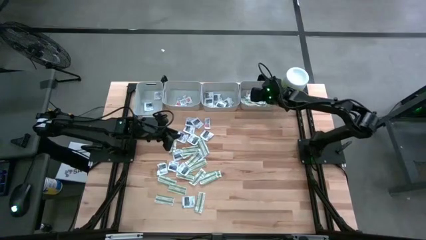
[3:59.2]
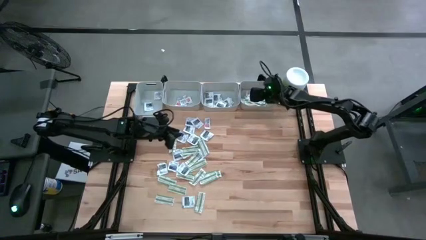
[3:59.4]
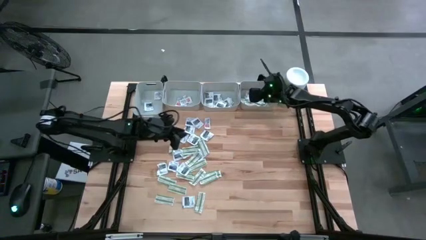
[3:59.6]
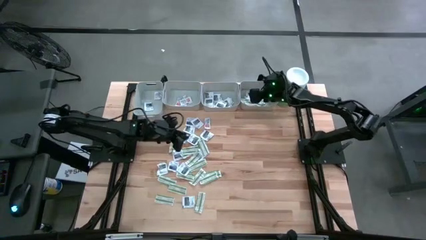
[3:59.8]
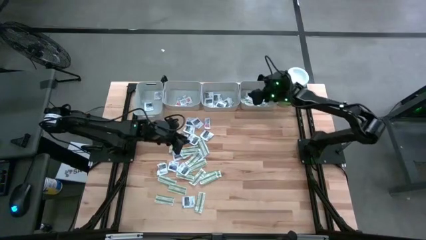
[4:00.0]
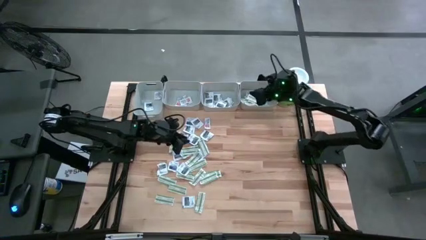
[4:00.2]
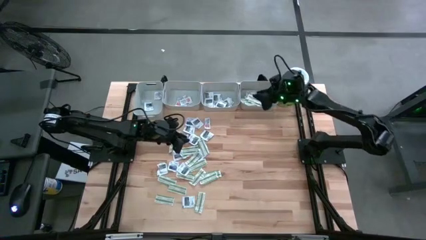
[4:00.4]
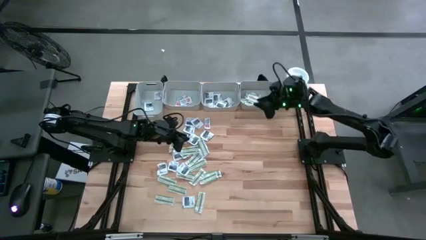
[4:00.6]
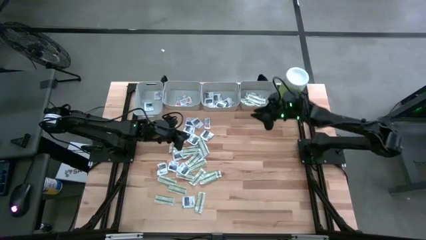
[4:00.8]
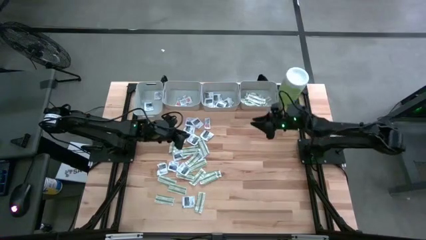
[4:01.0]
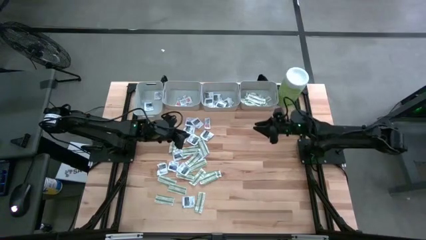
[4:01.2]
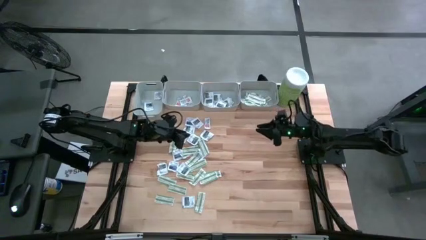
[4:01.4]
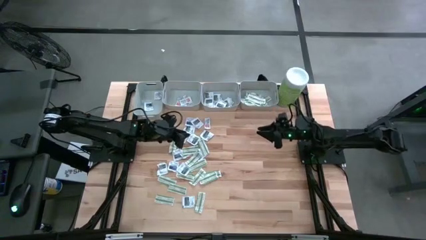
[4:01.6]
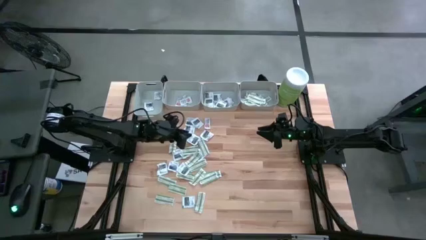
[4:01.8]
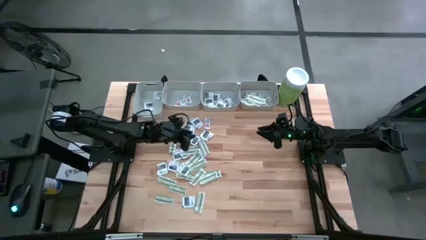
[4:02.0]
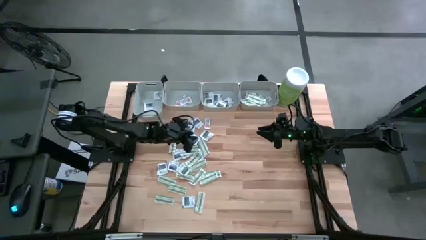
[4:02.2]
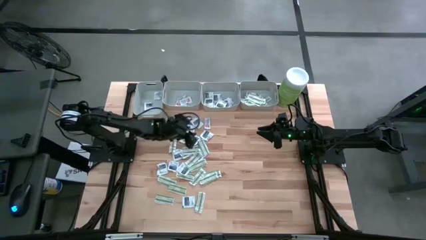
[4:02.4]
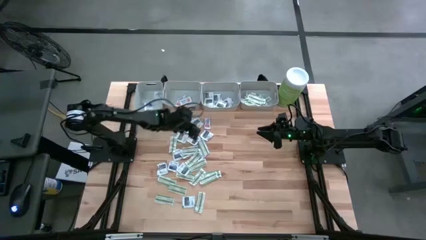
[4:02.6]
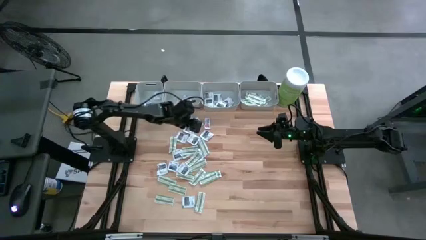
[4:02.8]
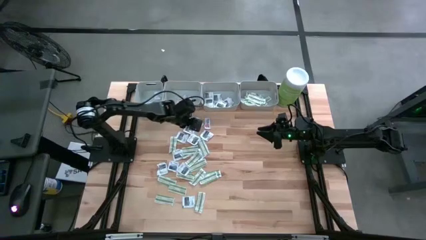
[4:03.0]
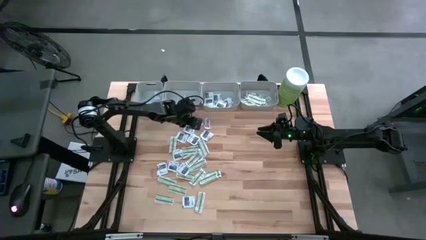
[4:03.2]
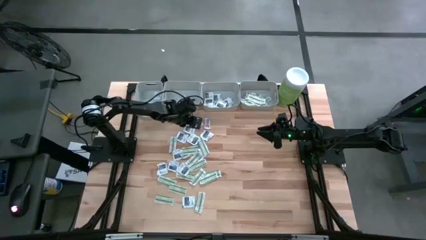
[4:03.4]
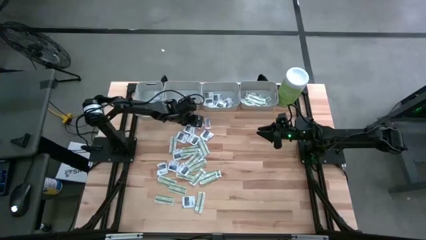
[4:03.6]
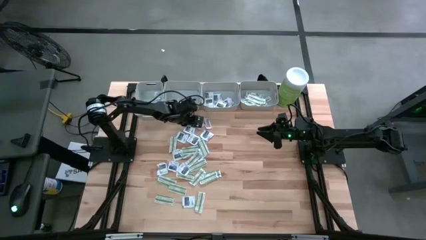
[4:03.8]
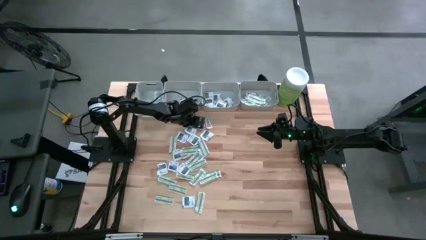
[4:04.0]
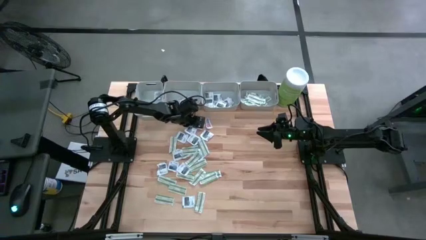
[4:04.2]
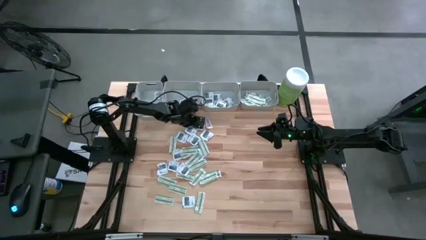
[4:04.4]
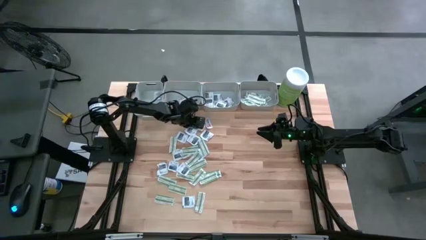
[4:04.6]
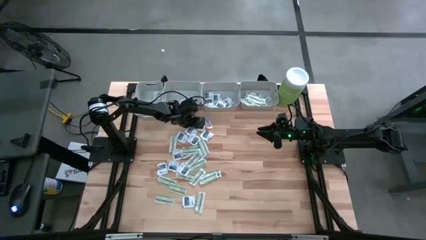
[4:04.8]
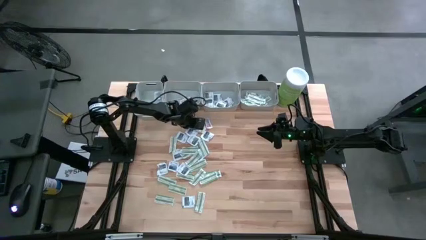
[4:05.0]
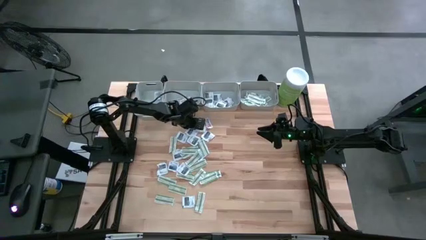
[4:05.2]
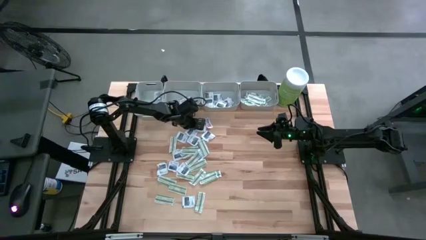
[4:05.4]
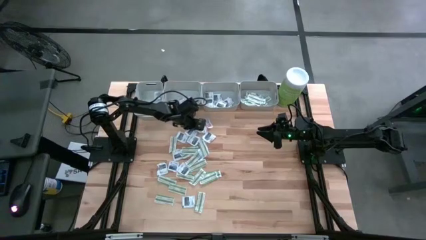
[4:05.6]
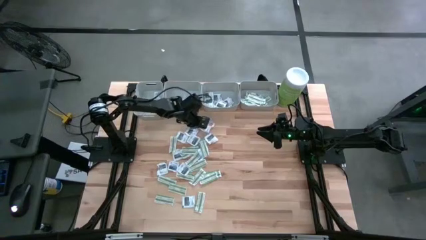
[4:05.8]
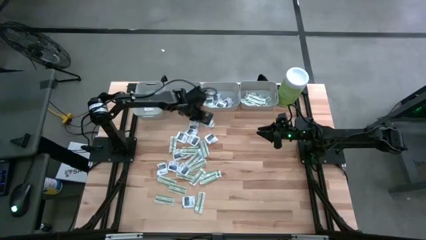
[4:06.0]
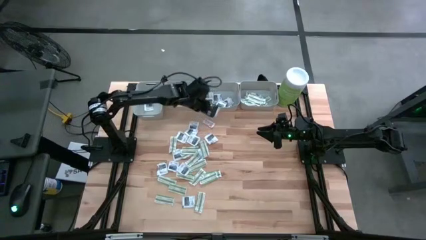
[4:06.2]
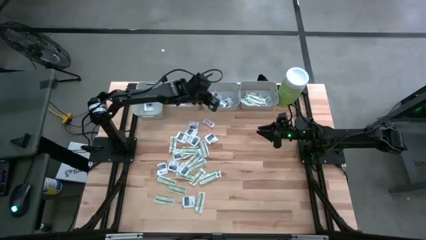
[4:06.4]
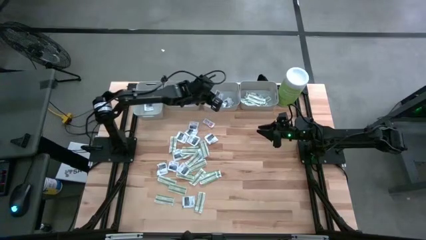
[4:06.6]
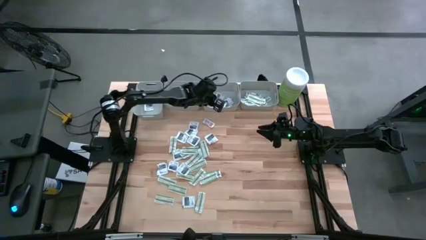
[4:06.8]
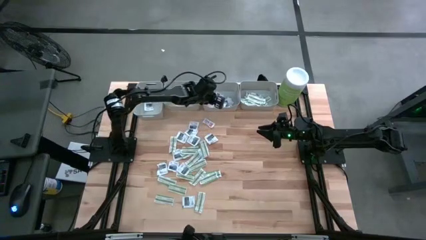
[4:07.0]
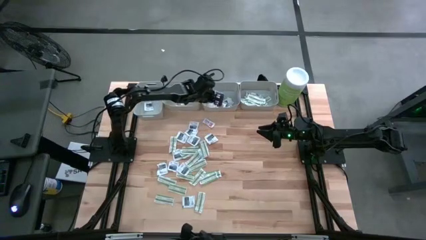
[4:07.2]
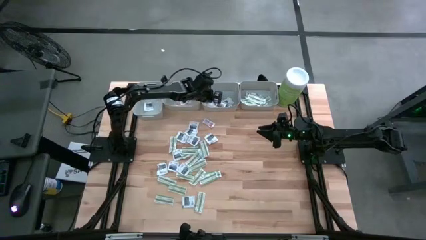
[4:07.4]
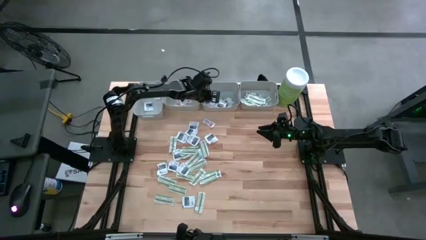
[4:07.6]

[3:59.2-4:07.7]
Task: Pick & Place First Aid Supplies
Put the gray towelette pack into the middle right gray bin

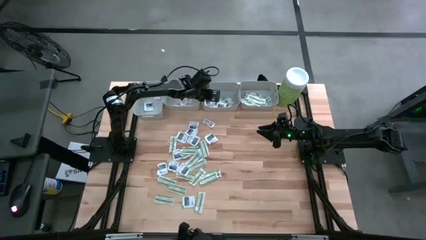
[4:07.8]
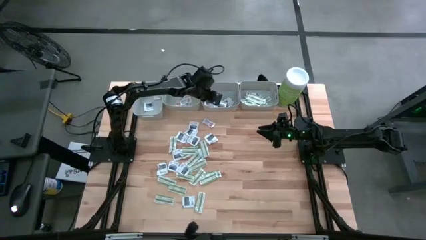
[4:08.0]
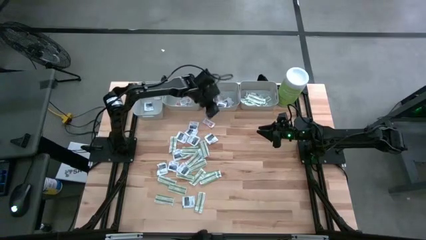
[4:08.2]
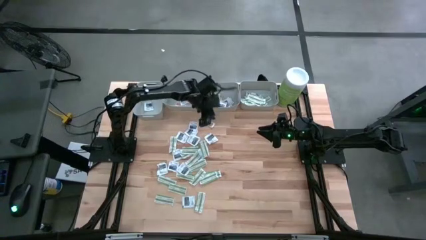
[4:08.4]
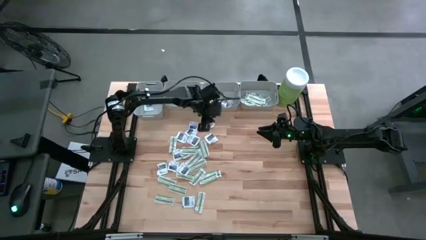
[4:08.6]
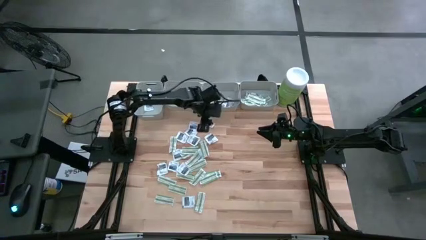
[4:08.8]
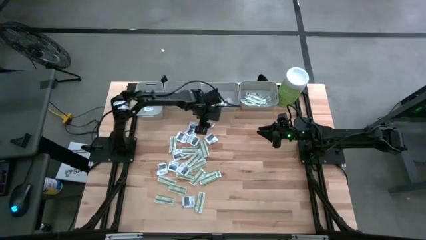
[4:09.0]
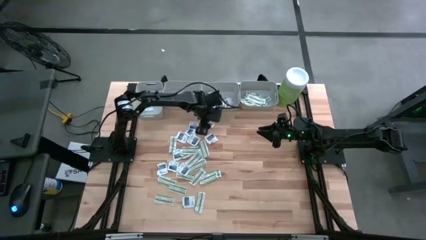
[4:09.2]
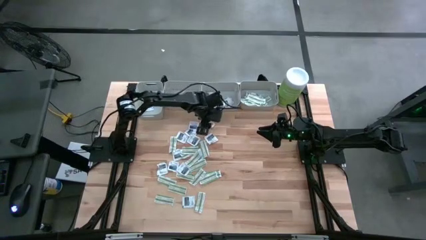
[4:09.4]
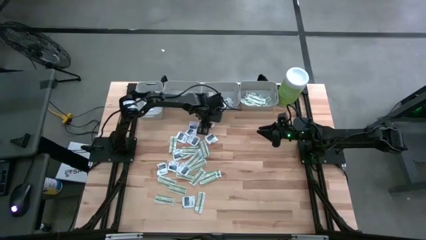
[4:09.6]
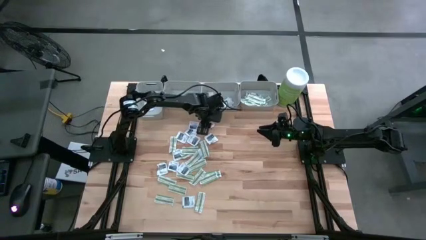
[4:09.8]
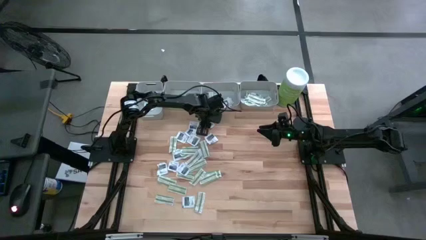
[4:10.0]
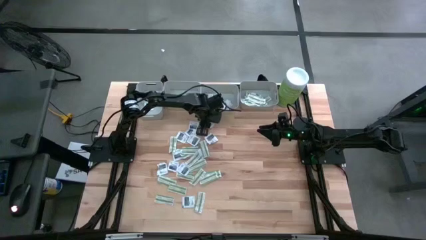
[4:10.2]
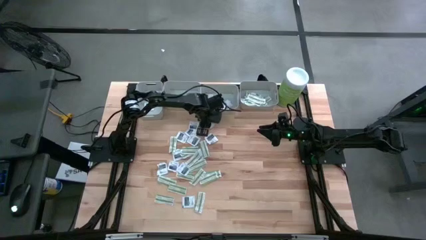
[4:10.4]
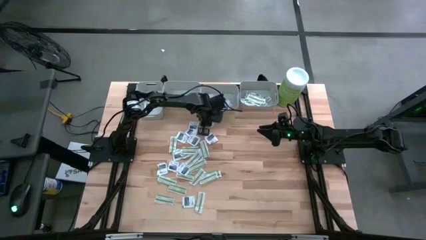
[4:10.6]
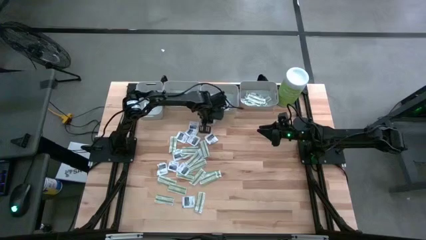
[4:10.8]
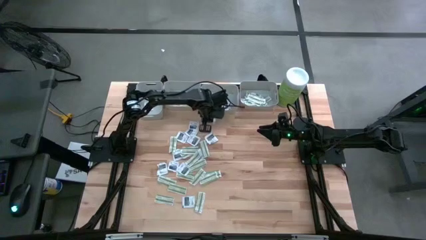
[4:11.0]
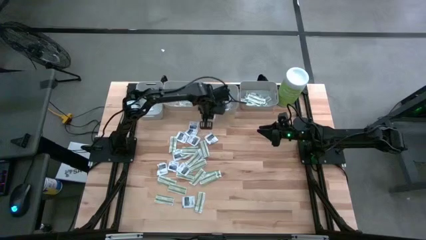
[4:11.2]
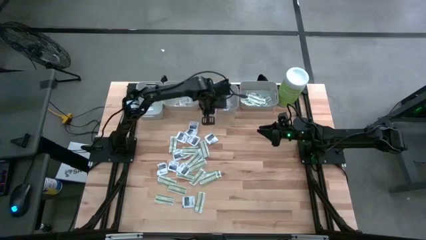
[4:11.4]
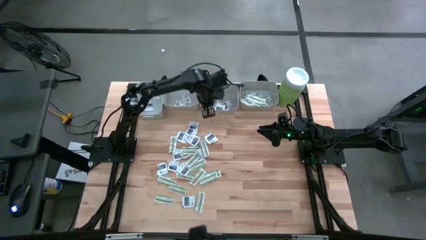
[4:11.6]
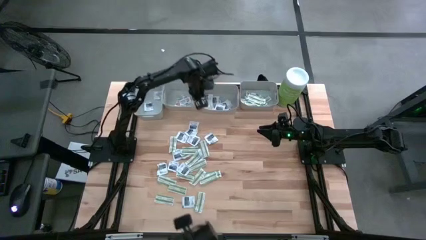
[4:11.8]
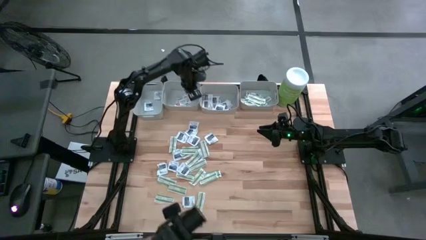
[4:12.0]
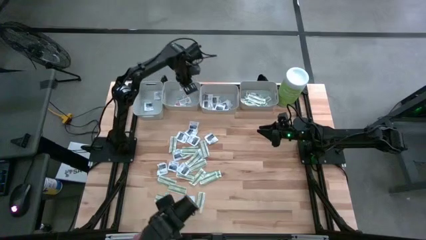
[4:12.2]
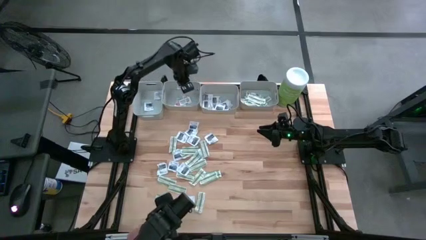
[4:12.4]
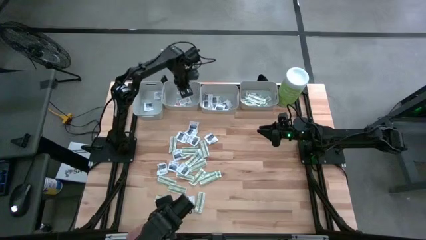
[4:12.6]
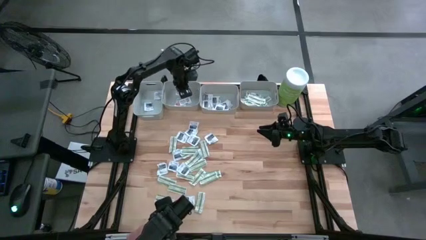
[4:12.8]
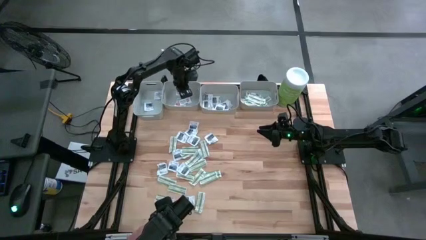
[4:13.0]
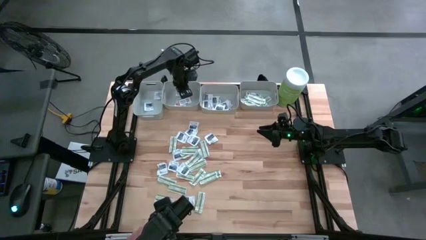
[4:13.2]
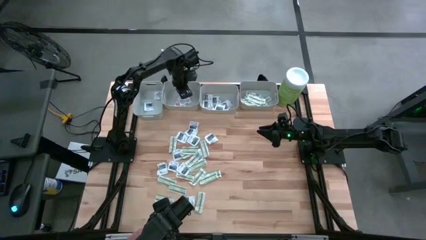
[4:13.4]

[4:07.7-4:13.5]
Put the orange ointment pack into the middle left gray bin

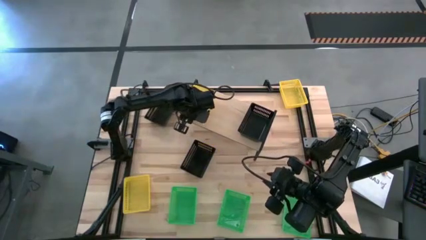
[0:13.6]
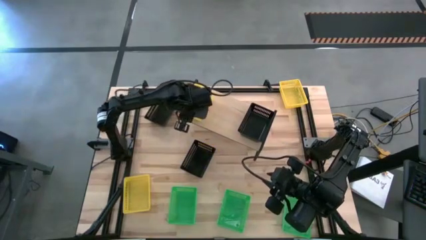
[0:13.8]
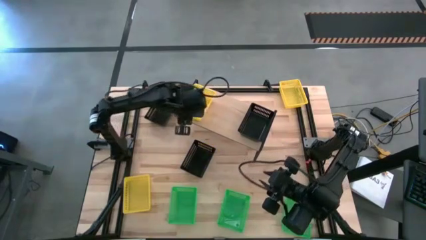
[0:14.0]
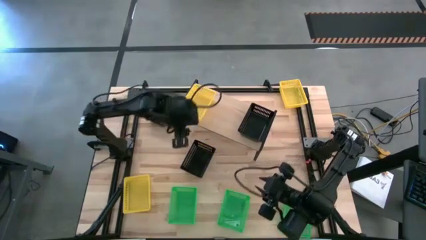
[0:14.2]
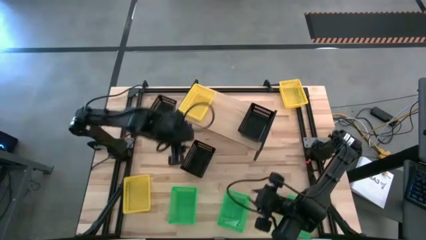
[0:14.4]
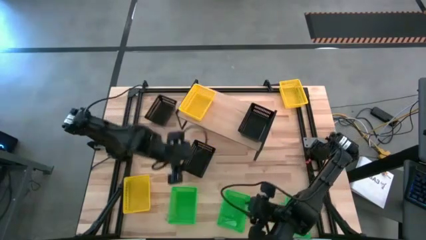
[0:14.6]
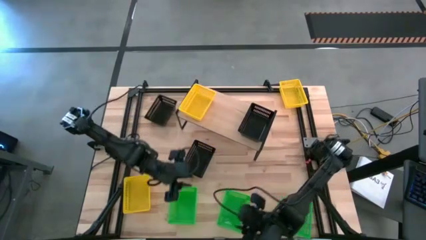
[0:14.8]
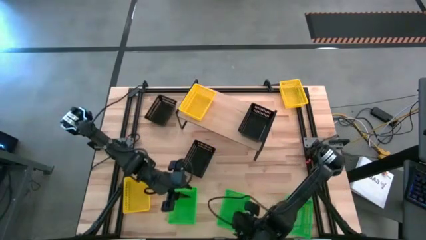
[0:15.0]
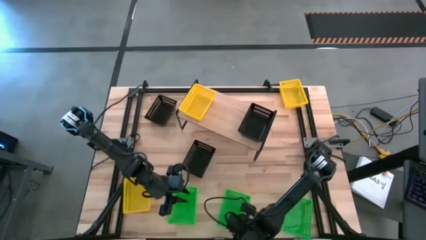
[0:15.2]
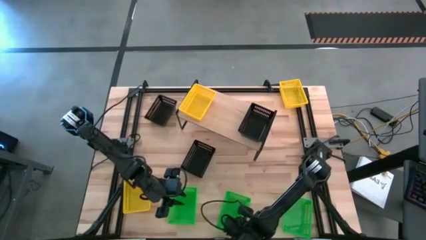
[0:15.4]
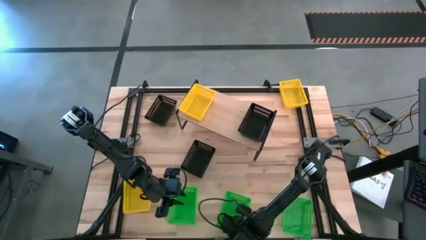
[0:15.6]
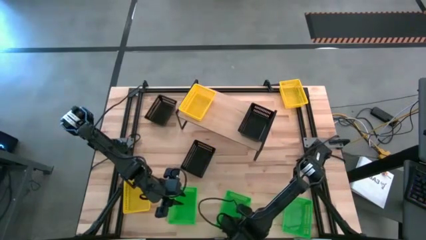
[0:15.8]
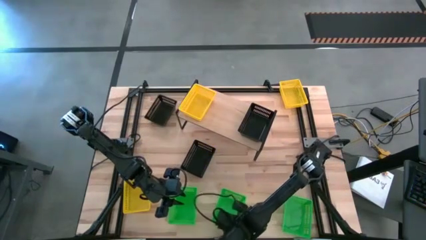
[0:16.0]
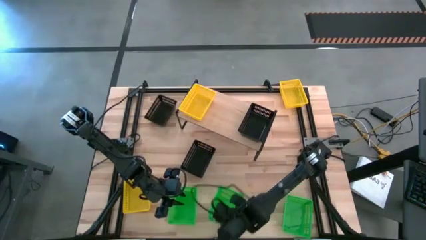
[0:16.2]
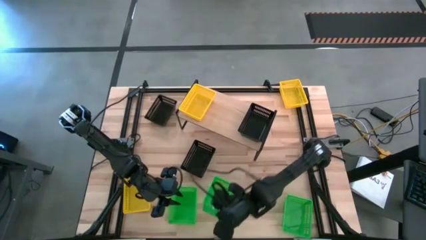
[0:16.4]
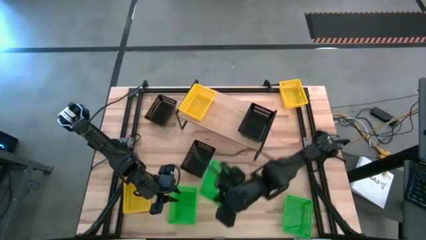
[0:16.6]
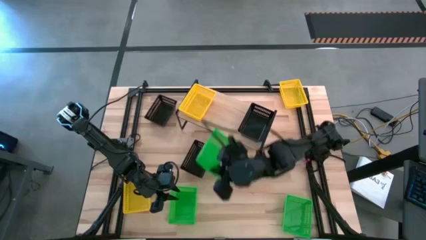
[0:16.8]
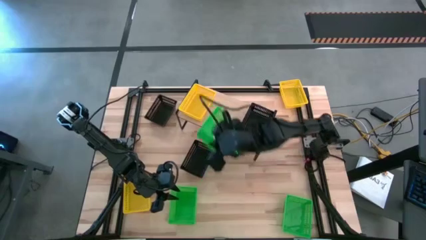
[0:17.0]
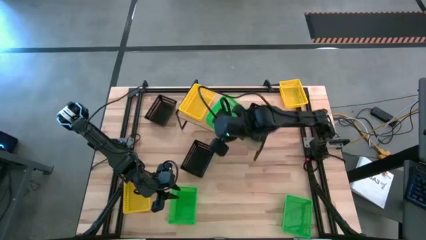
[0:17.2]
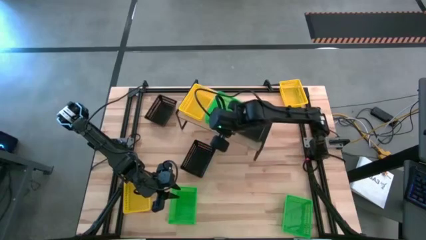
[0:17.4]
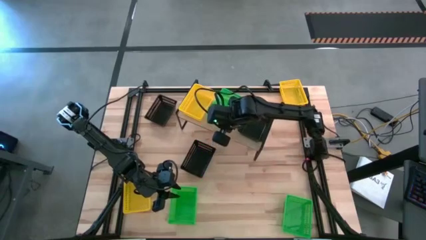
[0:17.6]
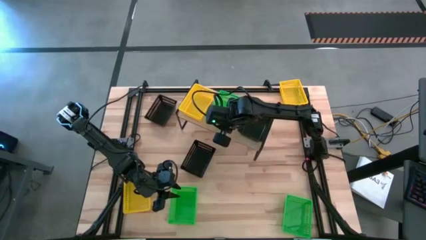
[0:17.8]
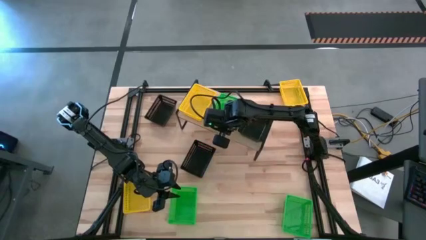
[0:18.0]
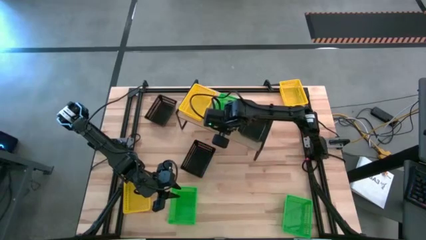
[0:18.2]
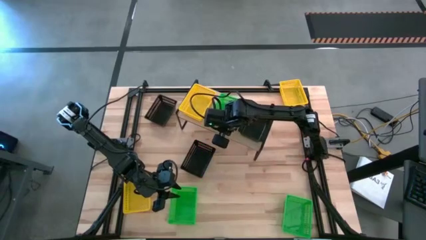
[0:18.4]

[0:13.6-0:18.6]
Task: Stack baskets on shelf by color
Put the middle green bin on the shelf
